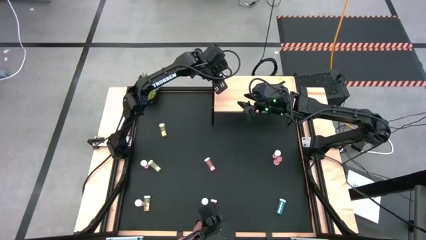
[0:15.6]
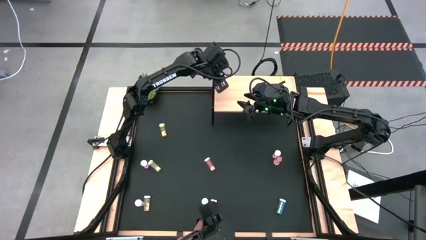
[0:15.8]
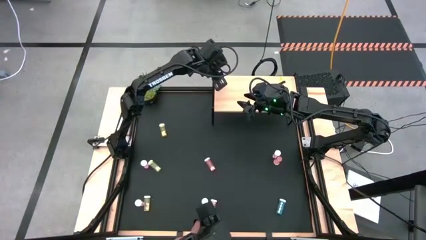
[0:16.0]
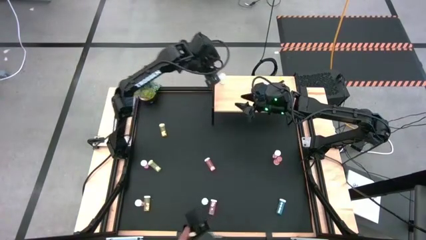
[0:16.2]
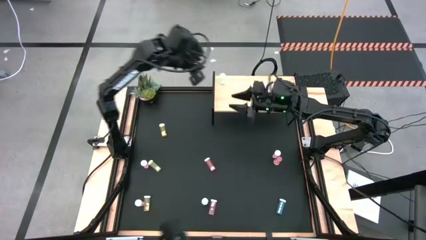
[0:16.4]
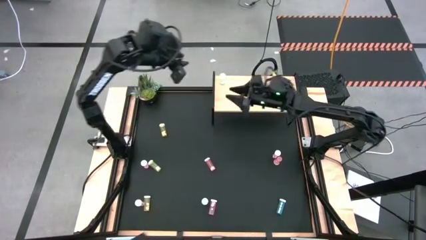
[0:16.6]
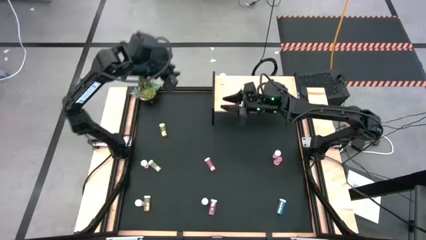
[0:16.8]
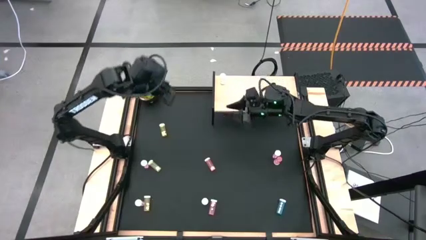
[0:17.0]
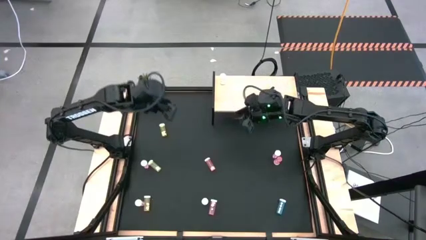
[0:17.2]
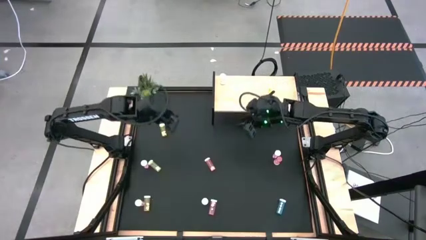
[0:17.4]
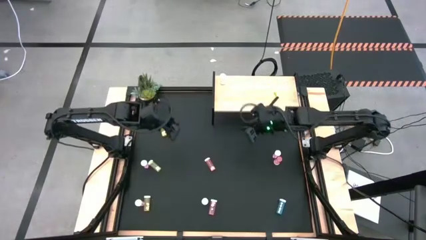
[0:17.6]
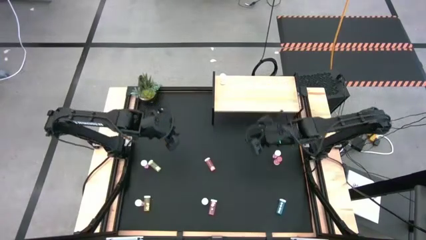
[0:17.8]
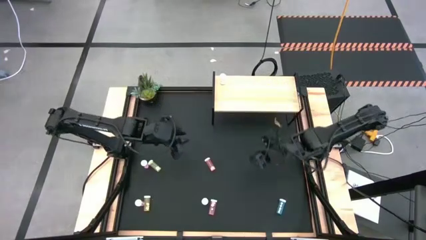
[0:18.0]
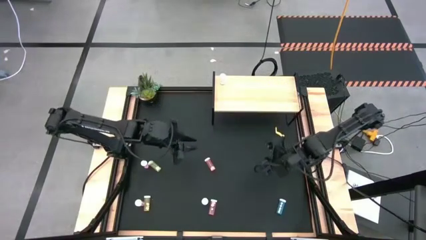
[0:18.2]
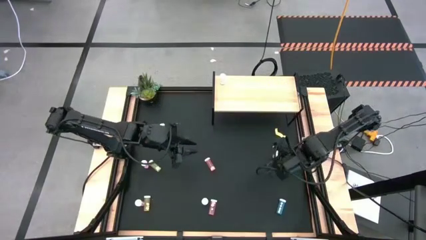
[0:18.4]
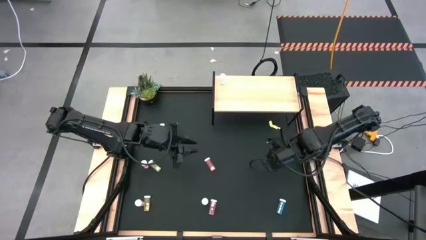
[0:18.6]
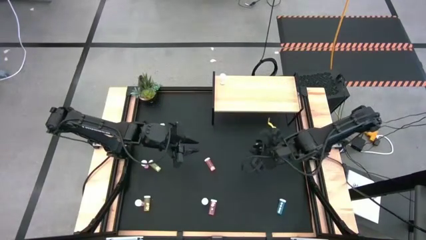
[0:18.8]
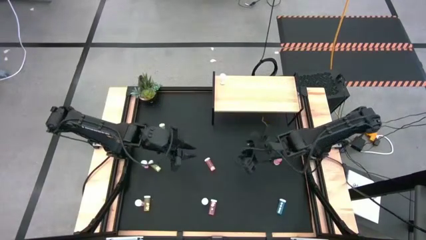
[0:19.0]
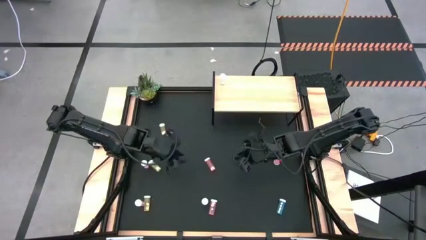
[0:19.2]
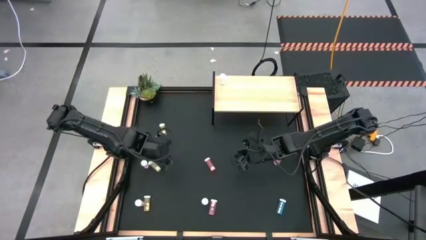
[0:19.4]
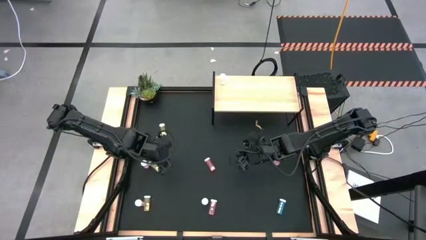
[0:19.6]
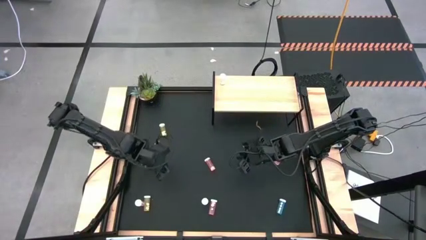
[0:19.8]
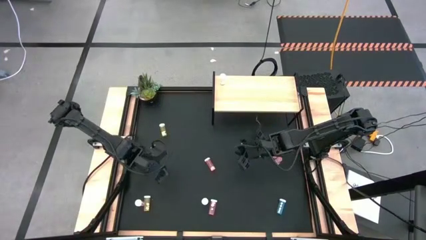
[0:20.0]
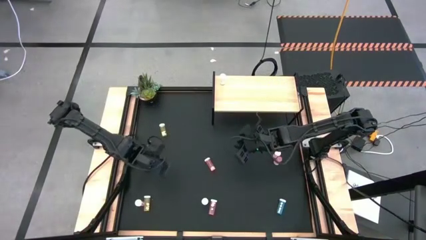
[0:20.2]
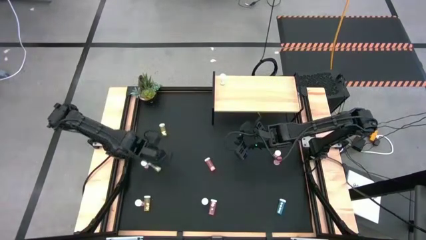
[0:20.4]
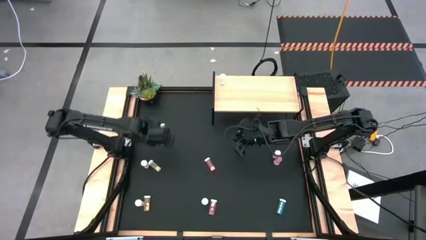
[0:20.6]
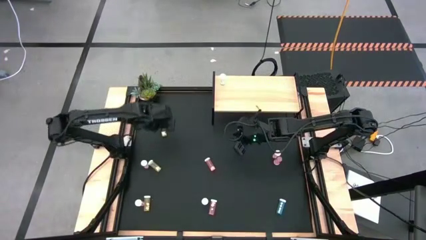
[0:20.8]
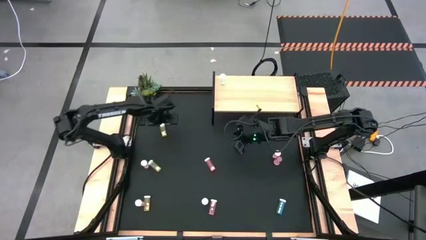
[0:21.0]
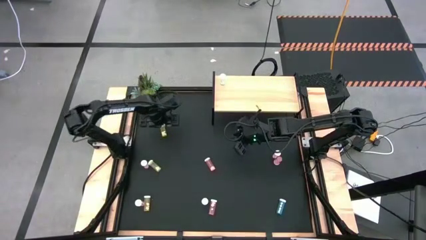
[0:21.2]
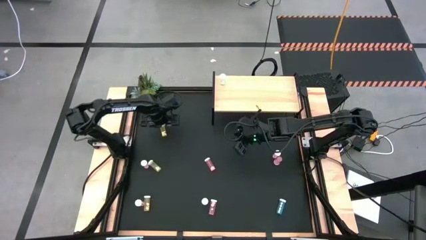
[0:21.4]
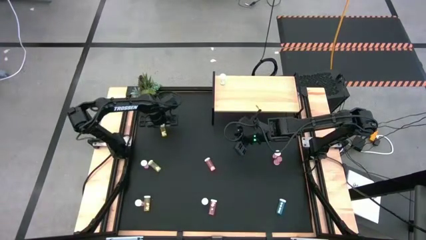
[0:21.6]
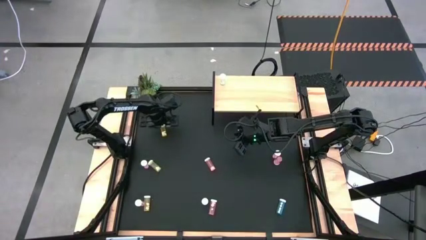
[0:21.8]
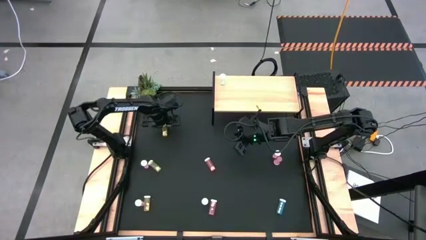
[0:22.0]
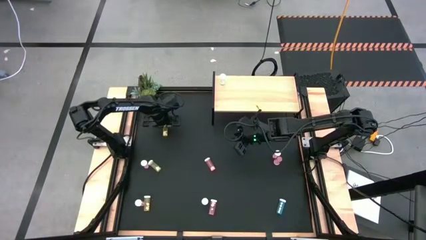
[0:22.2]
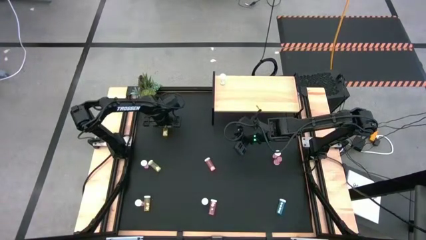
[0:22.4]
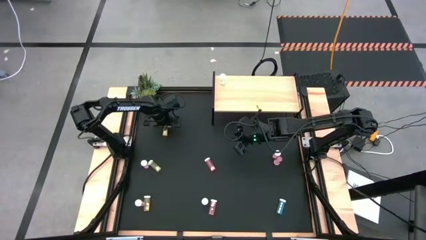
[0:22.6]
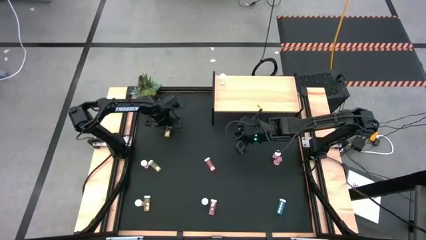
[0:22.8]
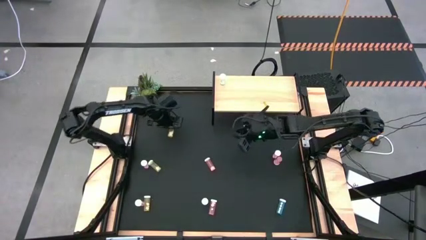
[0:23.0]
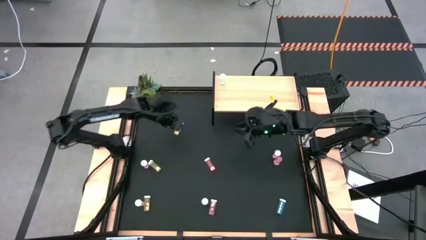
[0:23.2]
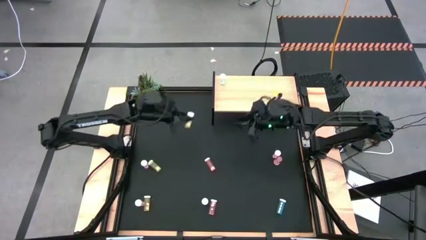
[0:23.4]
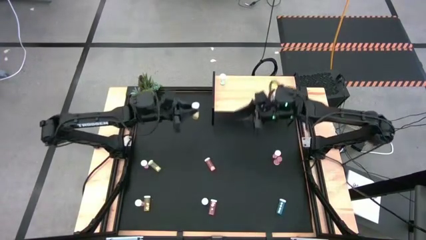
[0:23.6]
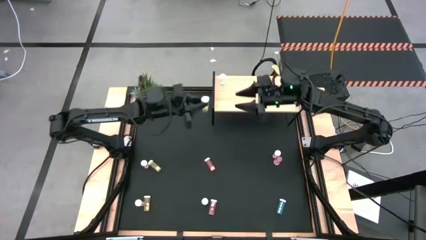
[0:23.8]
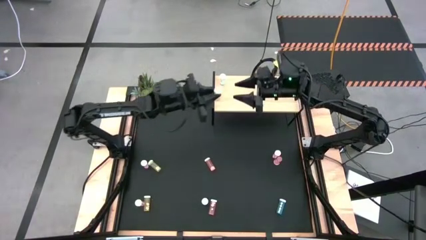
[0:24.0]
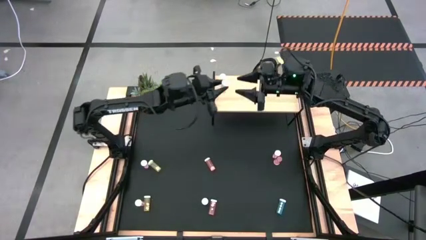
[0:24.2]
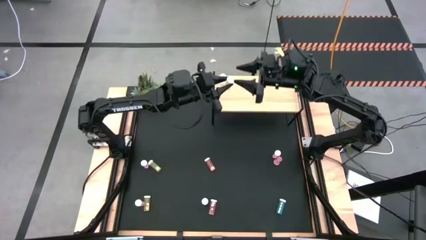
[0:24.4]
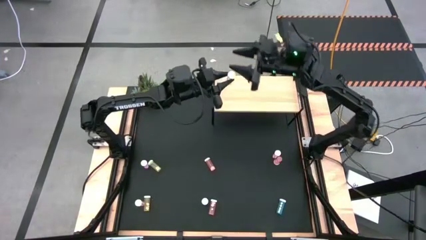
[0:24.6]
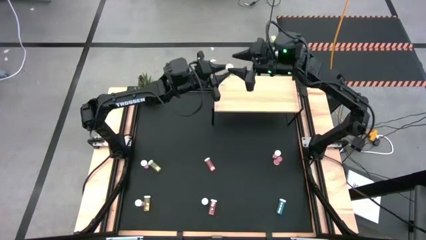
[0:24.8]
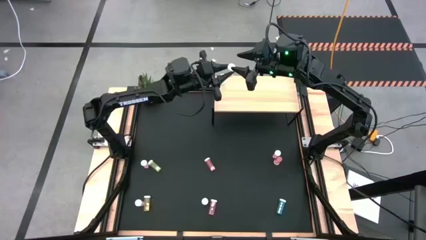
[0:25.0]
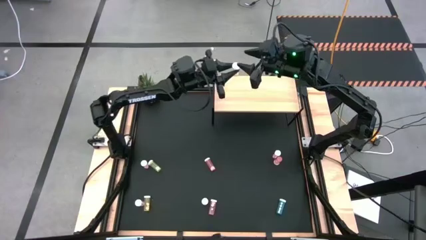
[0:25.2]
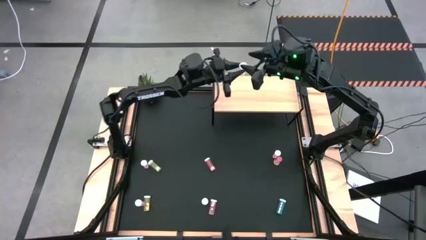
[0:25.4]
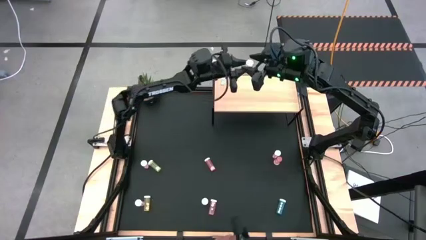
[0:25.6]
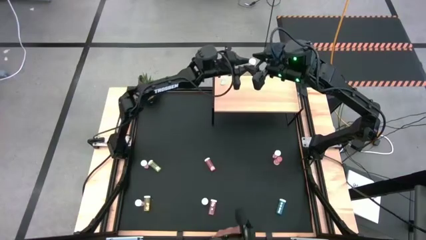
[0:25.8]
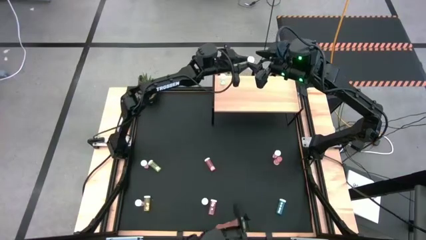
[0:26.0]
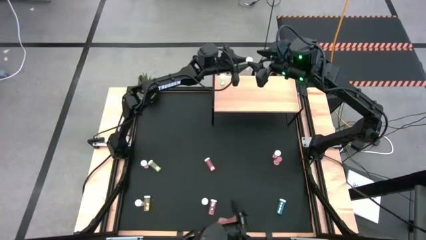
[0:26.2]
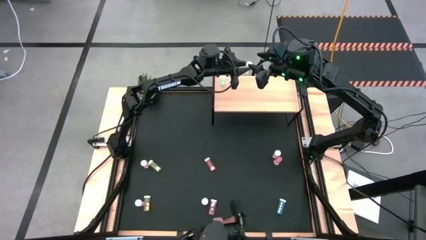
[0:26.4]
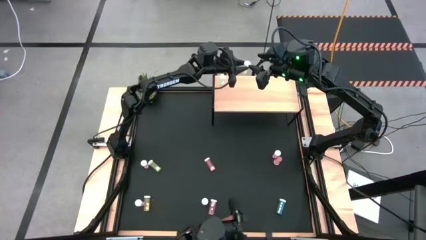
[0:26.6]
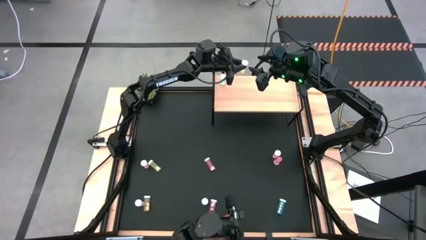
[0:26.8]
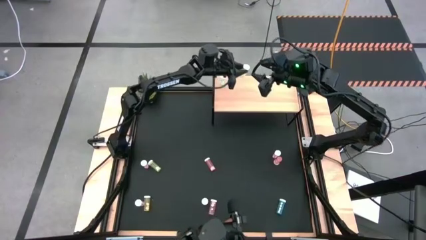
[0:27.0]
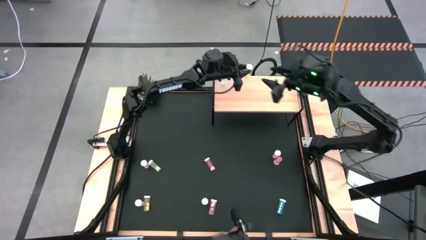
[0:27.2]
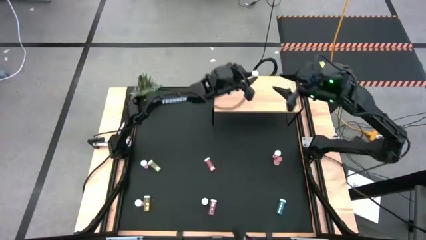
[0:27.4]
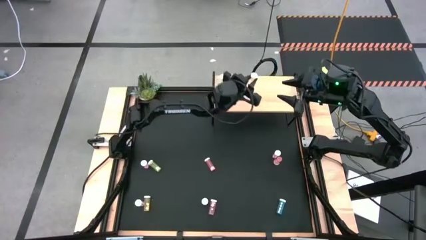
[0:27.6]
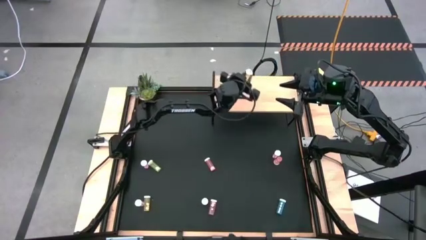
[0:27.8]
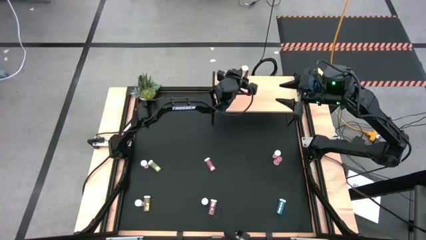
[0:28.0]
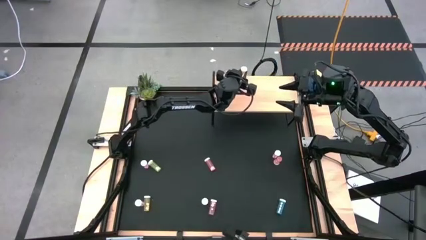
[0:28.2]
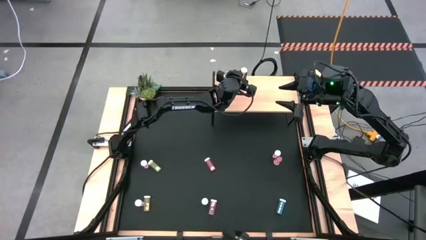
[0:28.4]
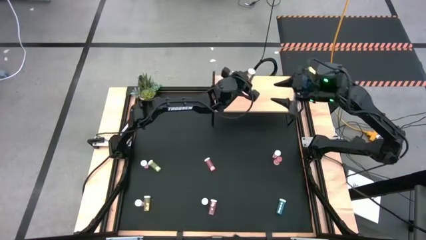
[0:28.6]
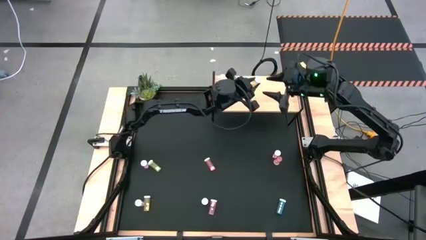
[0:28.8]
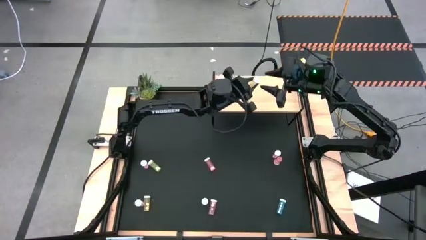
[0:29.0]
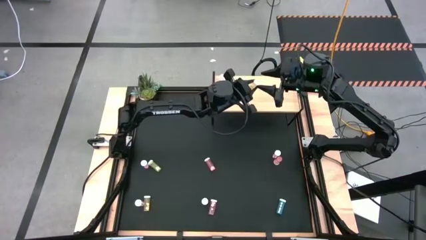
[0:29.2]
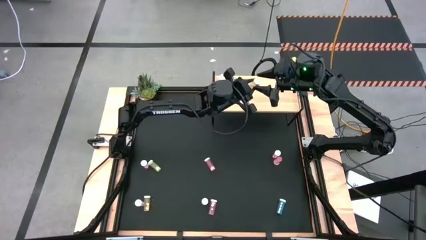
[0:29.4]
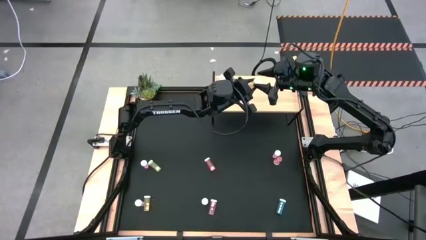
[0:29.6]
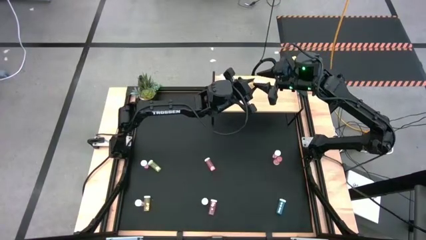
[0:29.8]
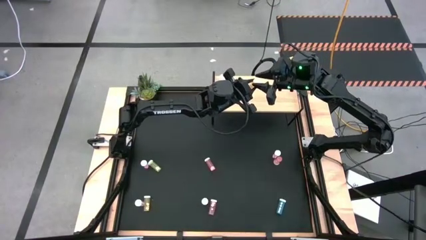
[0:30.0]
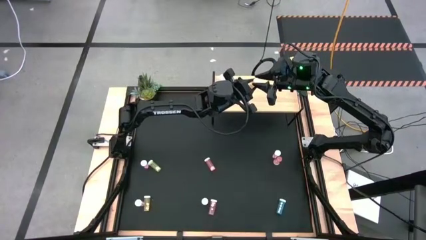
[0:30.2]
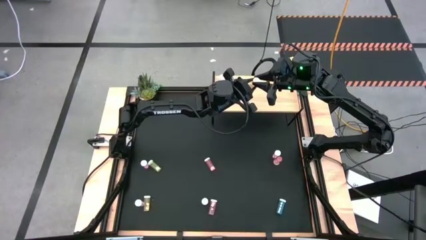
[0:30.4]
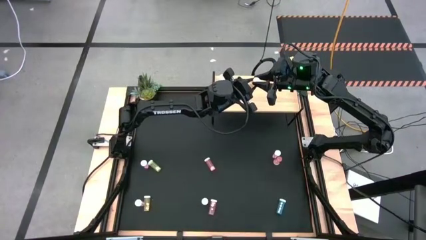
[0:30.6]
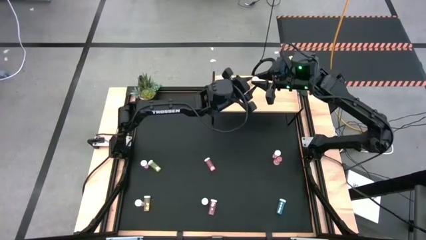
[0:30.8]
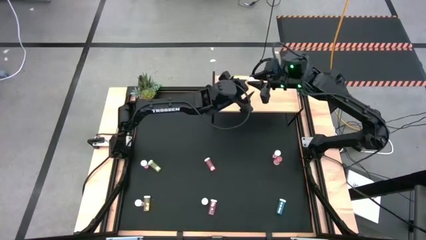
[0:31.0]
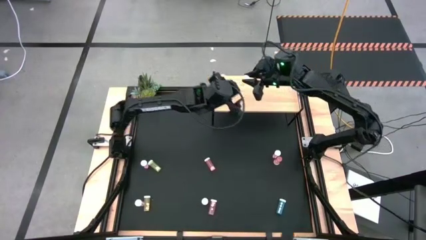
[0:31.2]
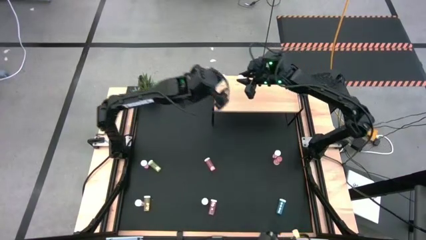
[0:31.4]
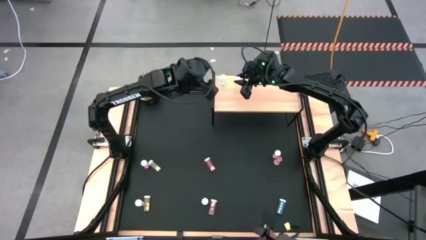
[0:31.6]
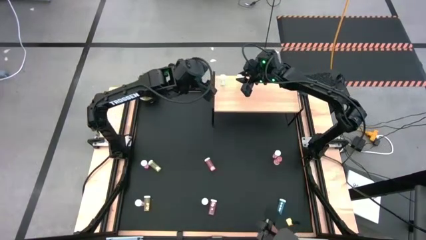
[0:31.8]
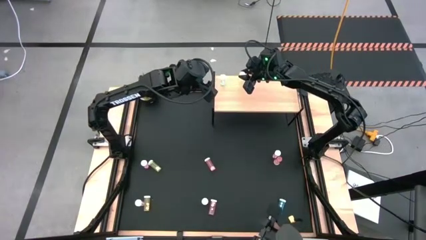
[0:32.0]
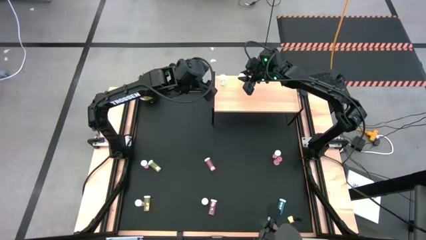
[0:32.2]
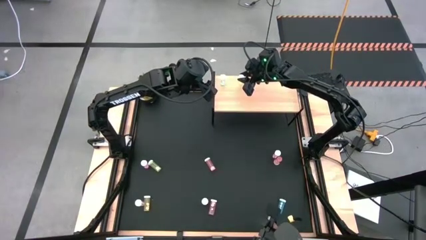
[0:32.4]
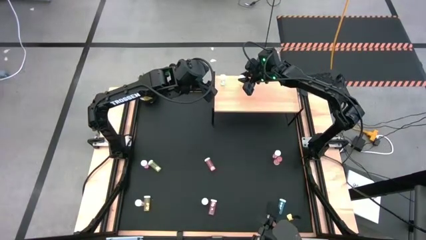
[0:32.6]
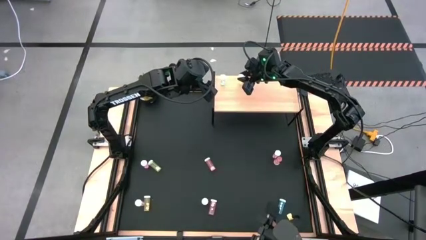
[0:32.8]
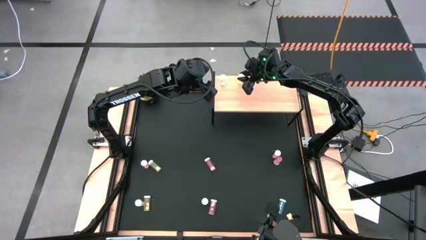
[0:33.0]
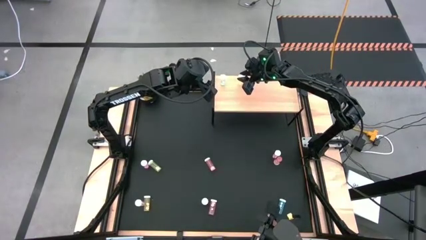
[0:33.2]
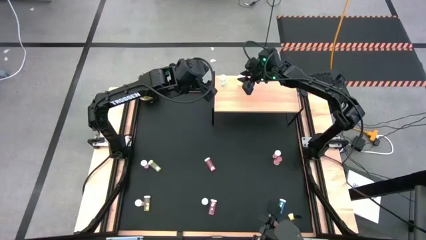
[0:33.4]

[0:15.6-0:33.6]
Task: Pick and place medicine bottles onto shelf by color
Put the top yellow pill bottle on the shelf
